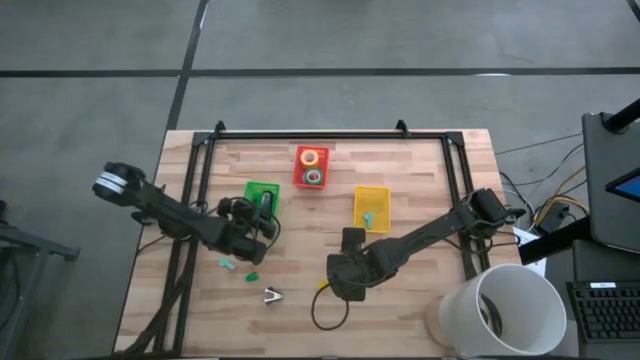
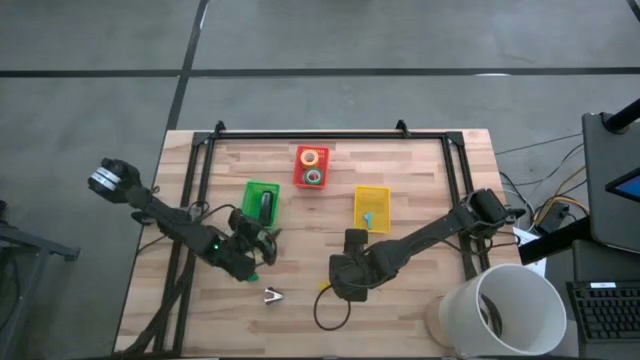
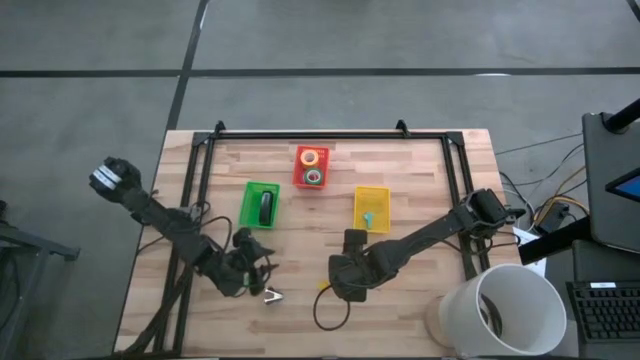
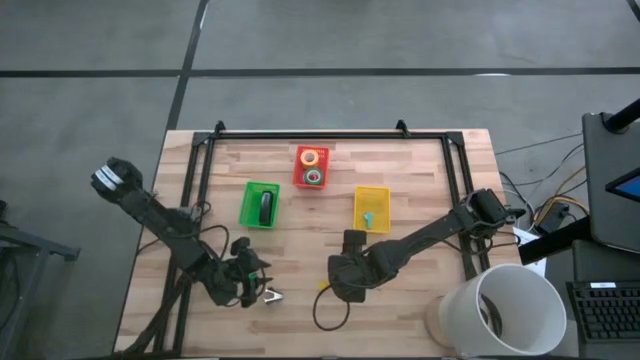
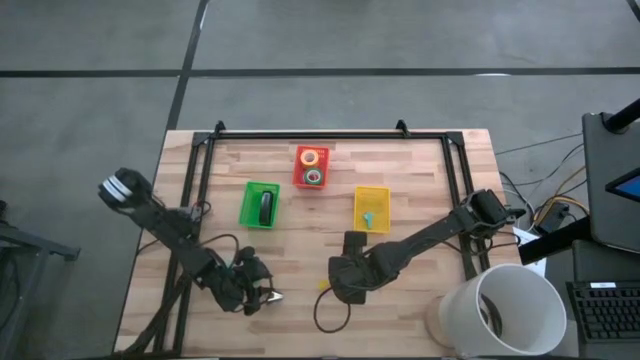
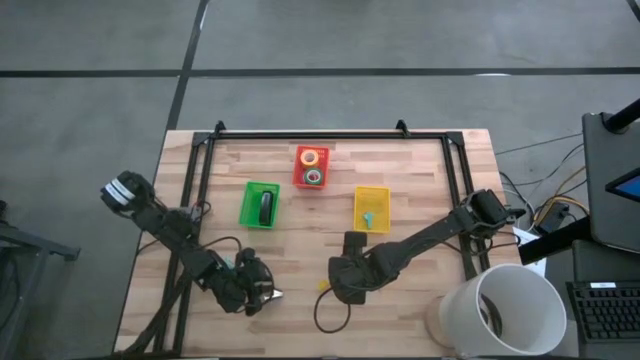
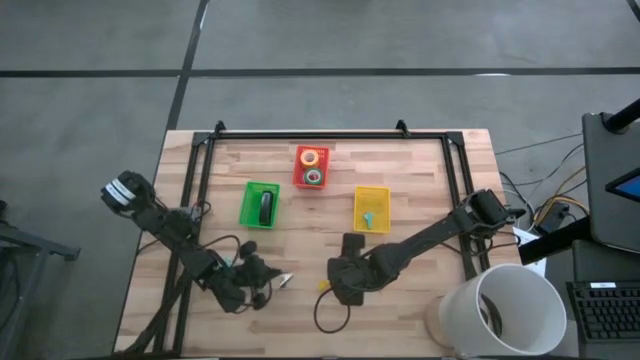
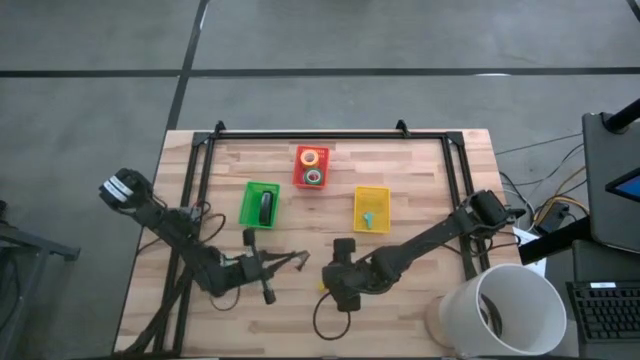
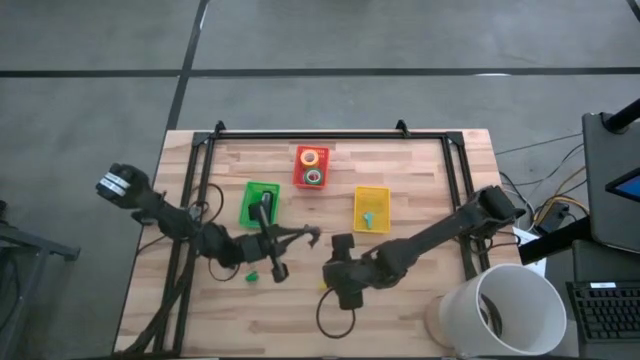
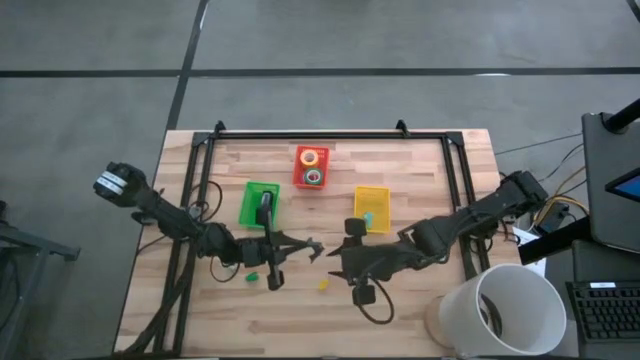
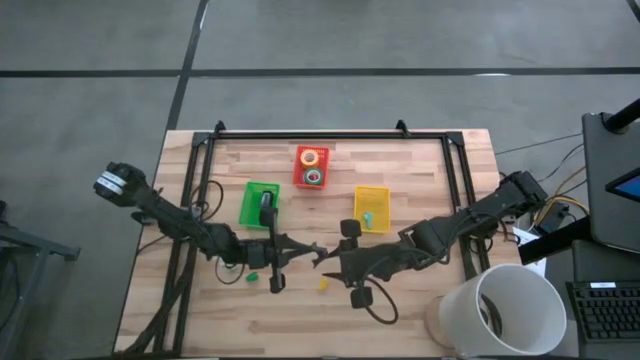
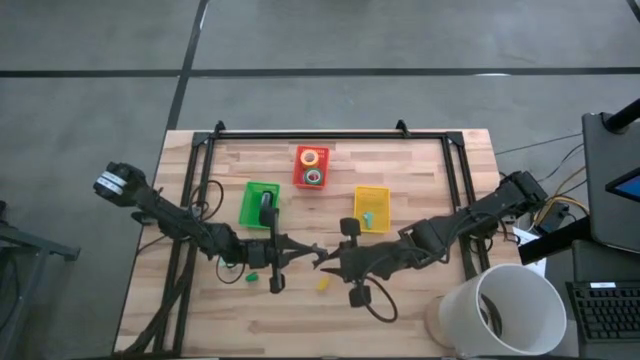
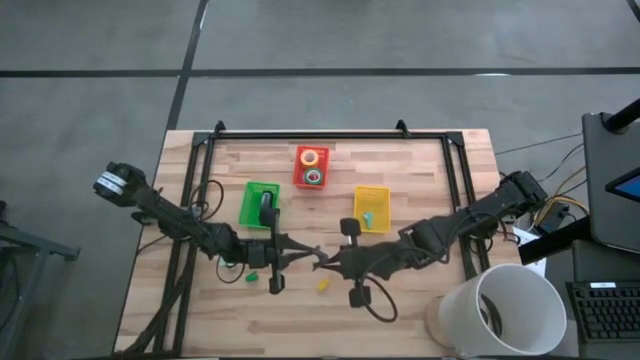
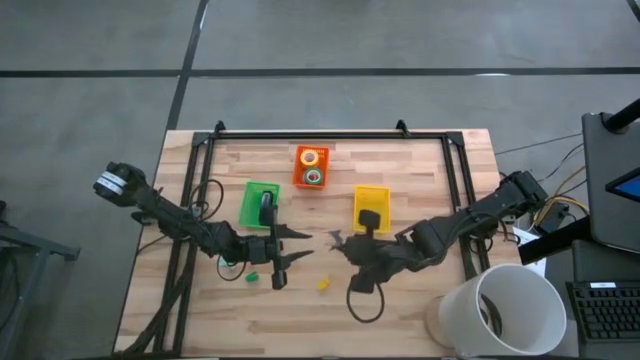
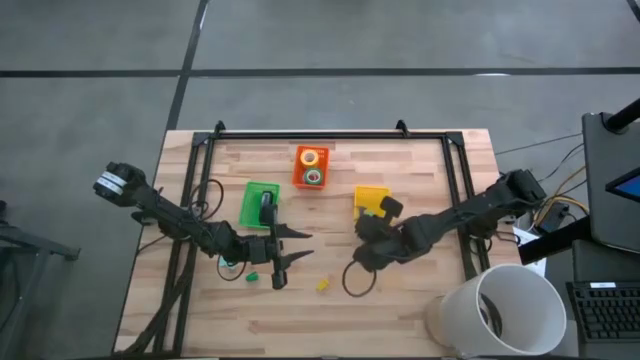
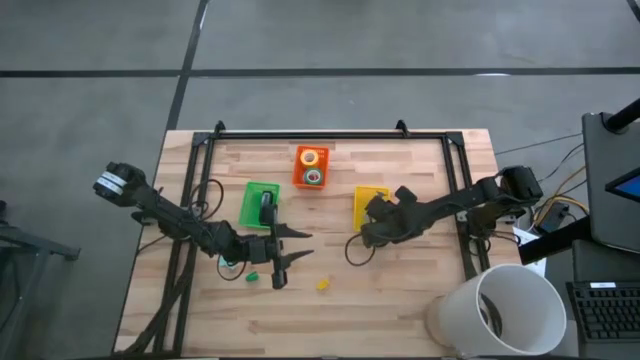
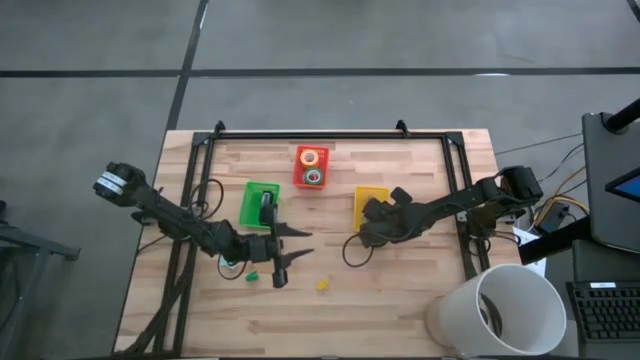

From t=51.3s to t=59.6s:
Task: Pick and place Stapler, Stapler remover, tape
Put the black staple remover into the yellow basket

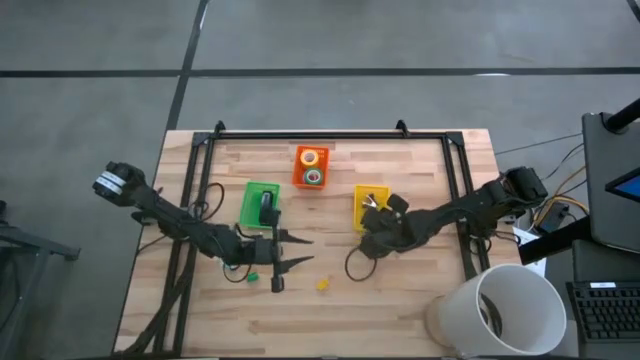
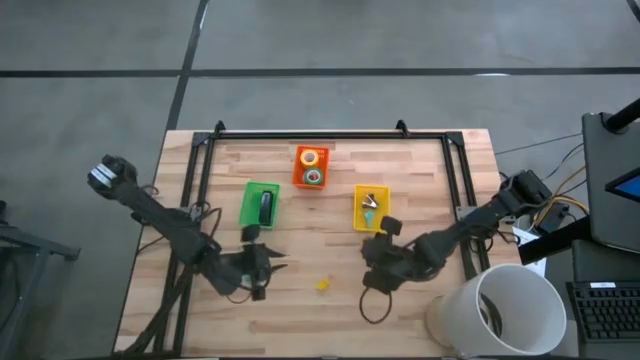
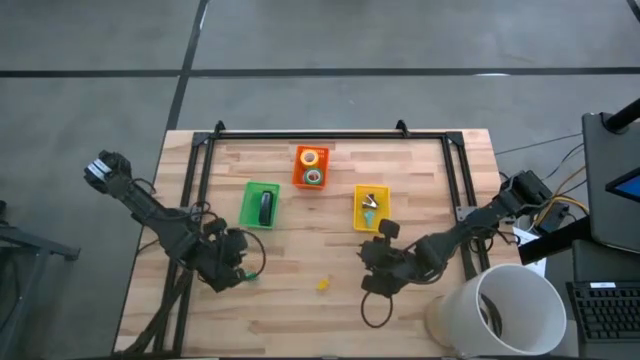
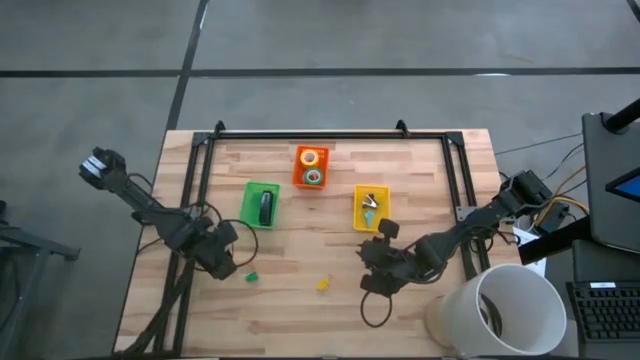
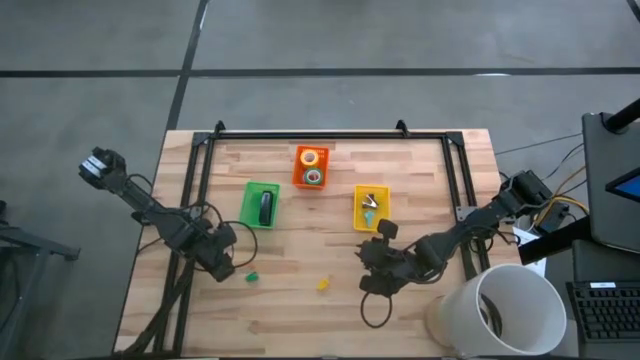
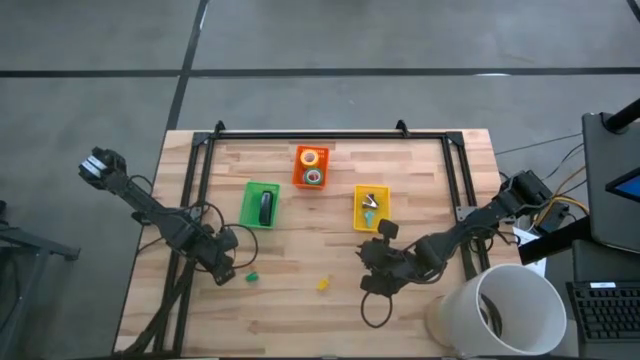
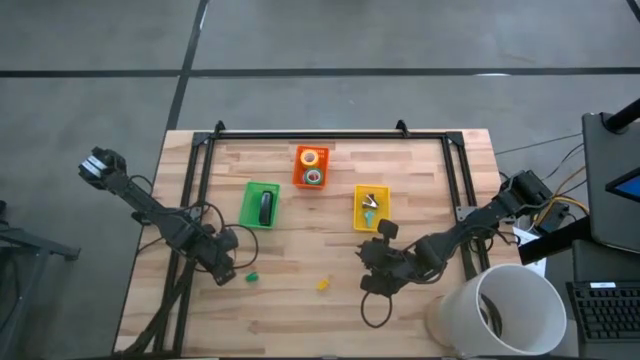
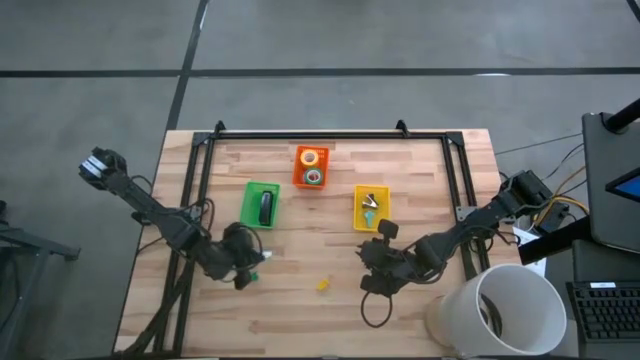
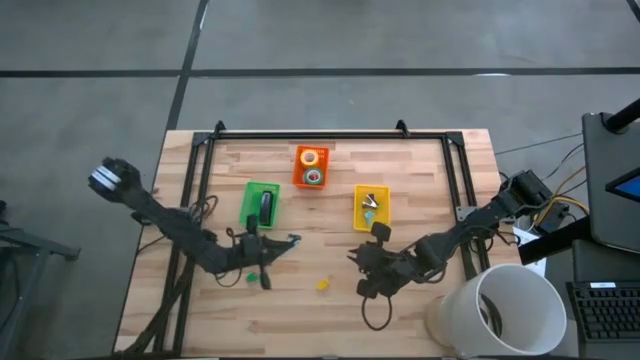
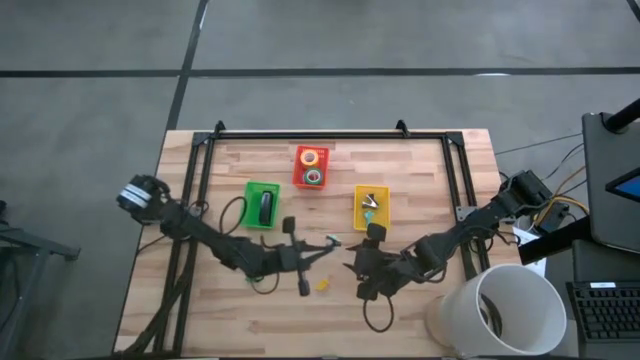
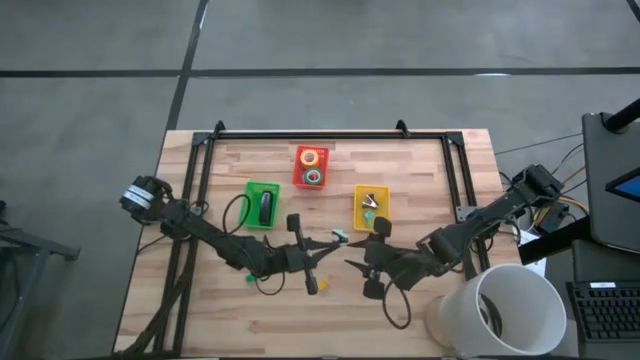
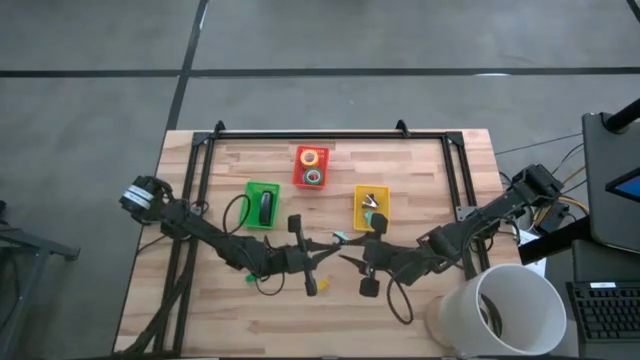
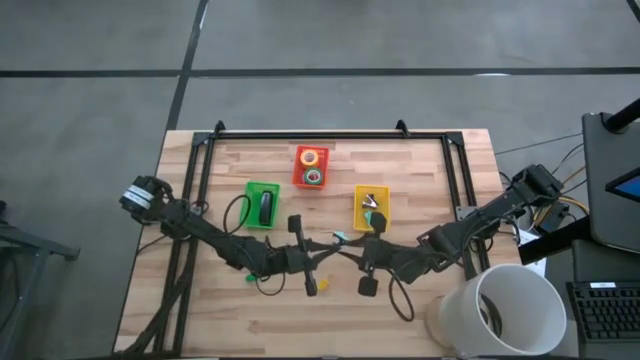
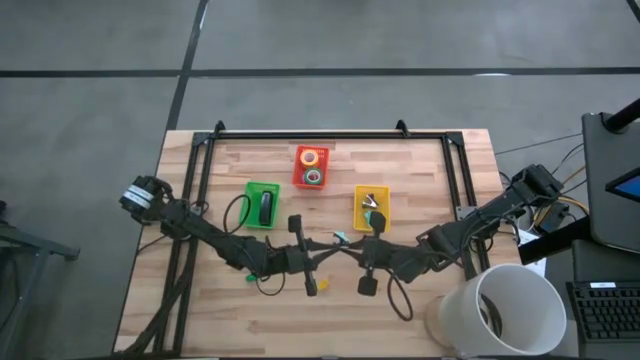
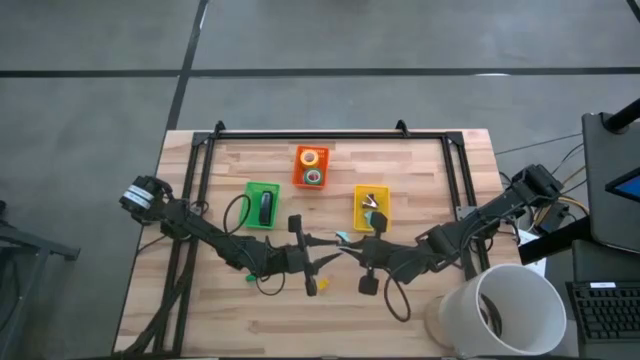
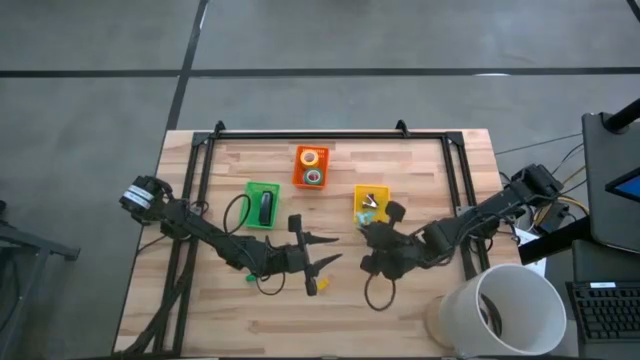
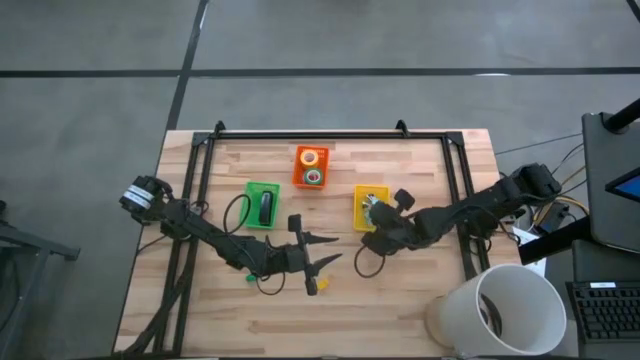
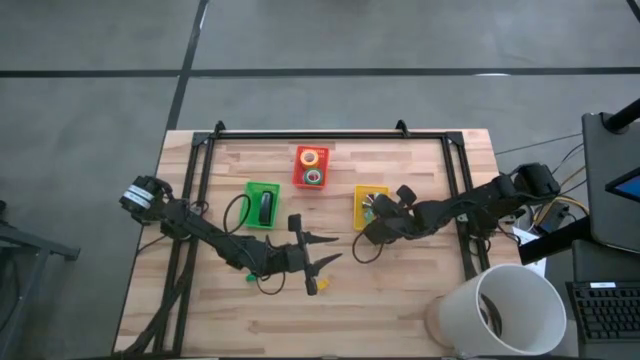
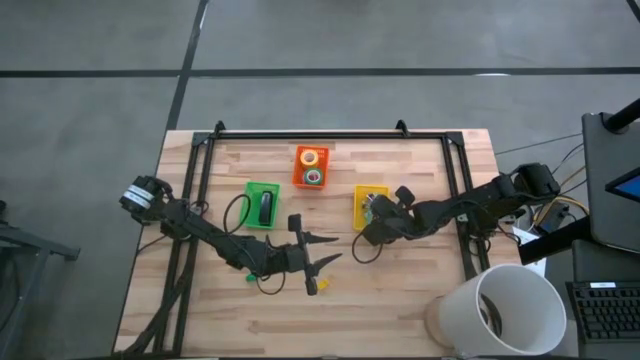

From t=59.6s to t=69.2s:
Put the blue staple remover into the yellow basket

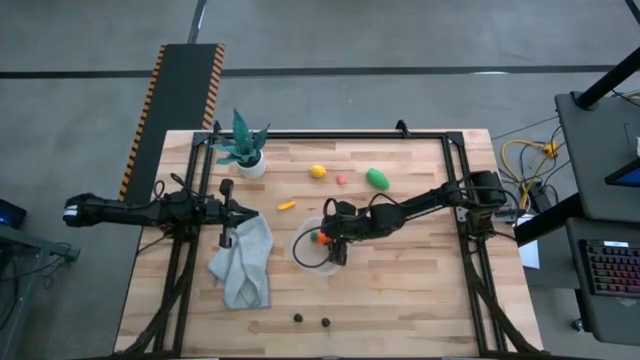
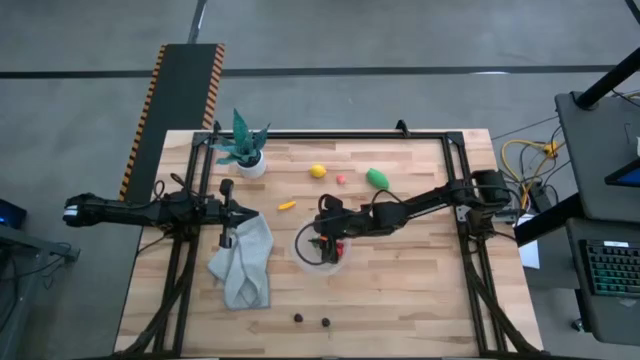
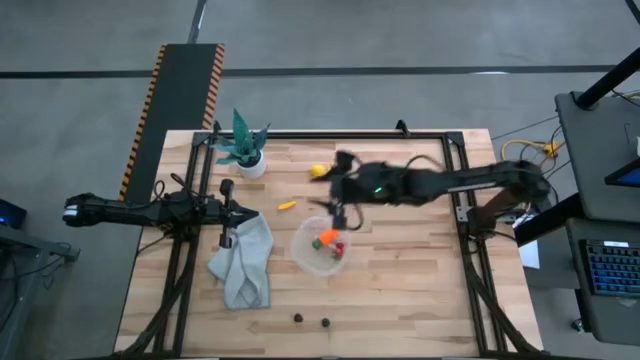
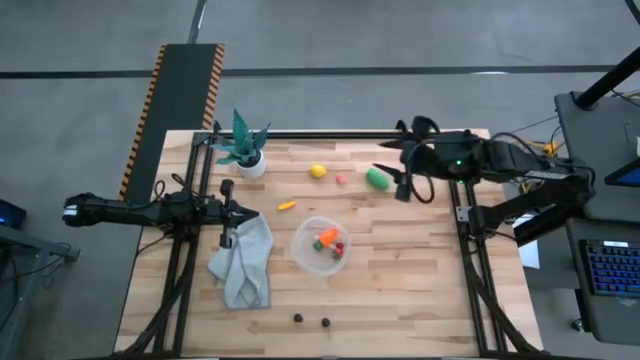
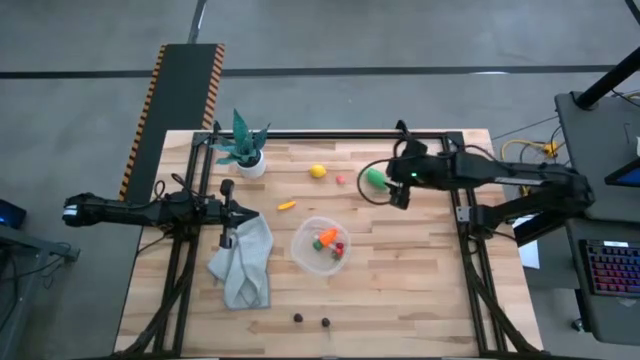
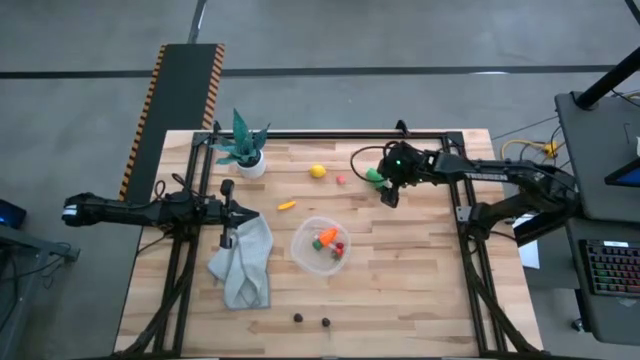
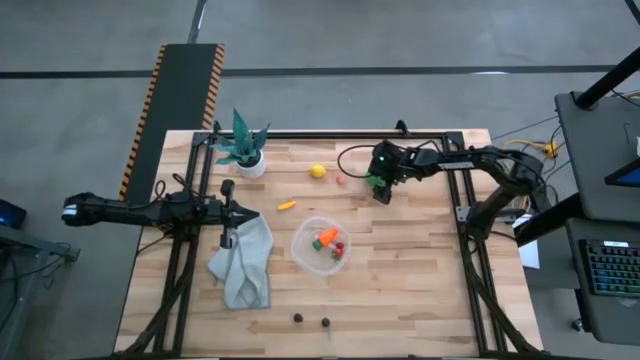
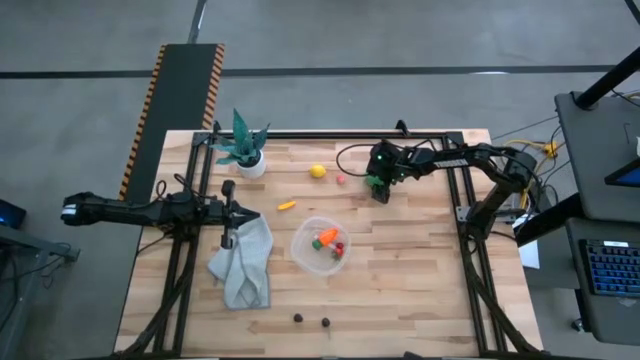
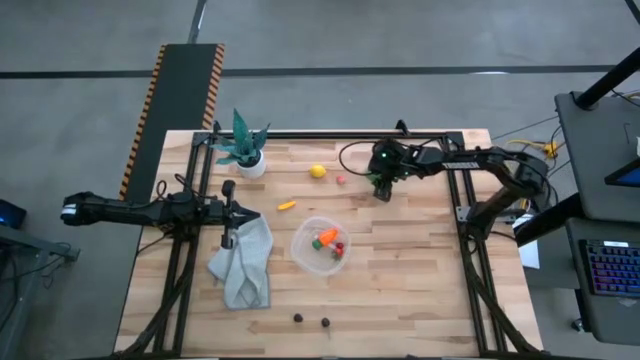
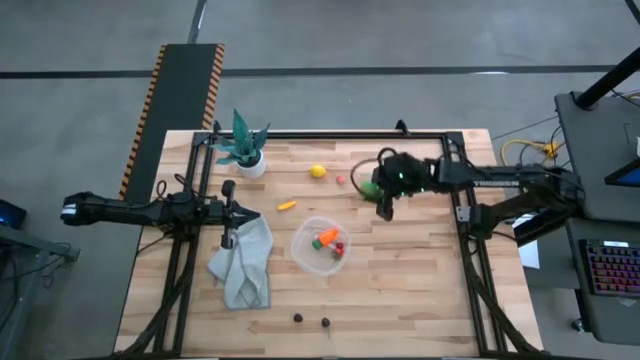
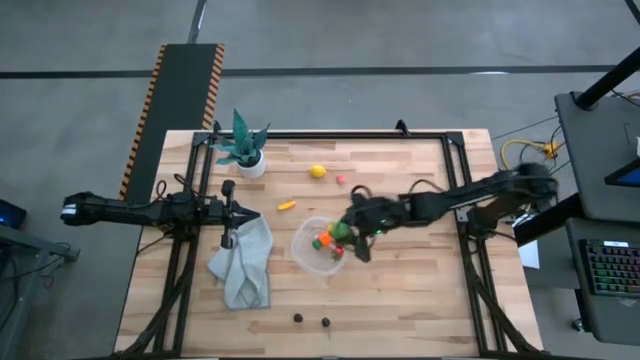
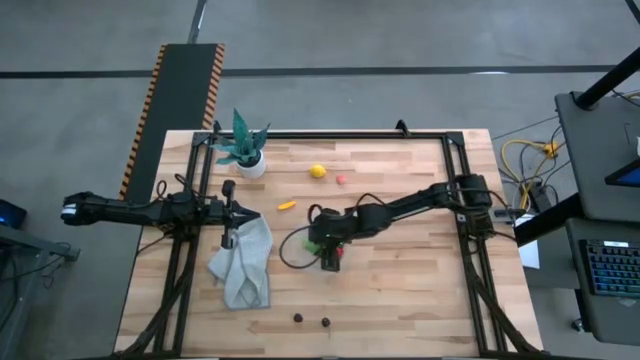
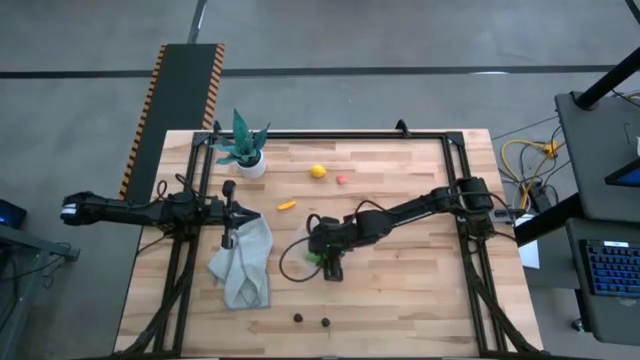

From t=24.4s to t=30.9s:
Task: Pick and placing Produce into tupperware
Put the green corn into the transparent bin
